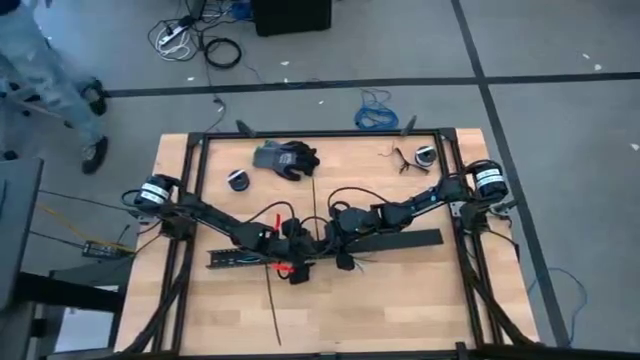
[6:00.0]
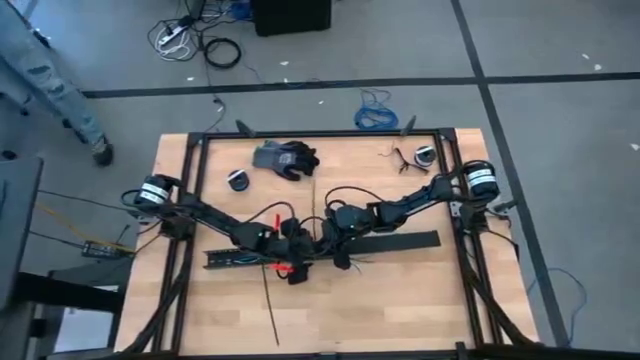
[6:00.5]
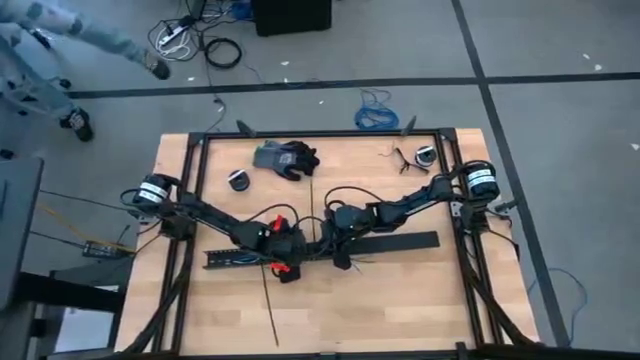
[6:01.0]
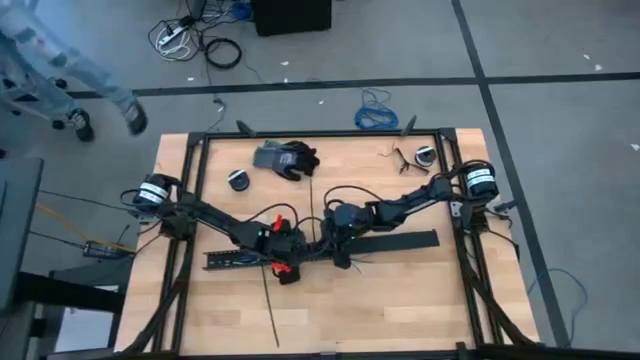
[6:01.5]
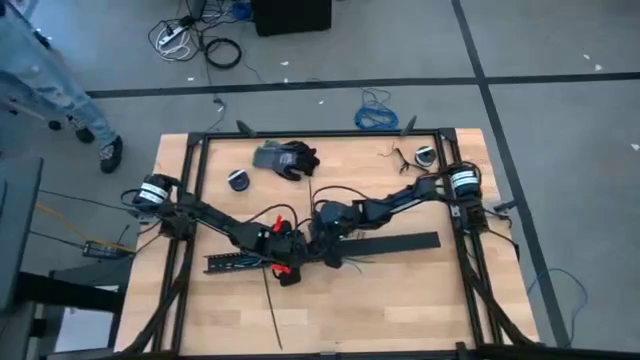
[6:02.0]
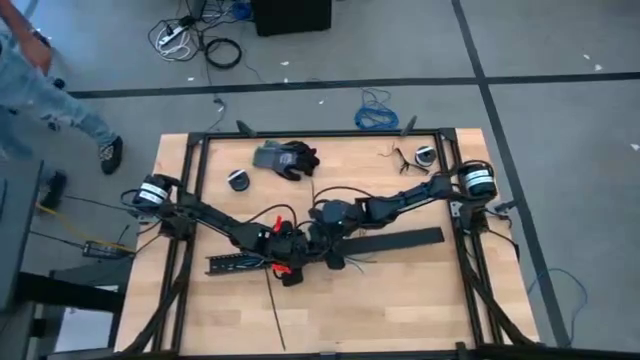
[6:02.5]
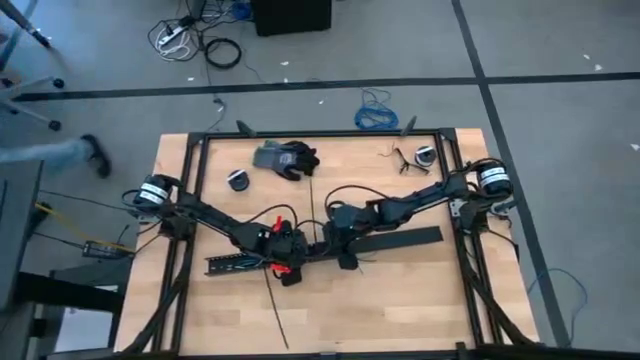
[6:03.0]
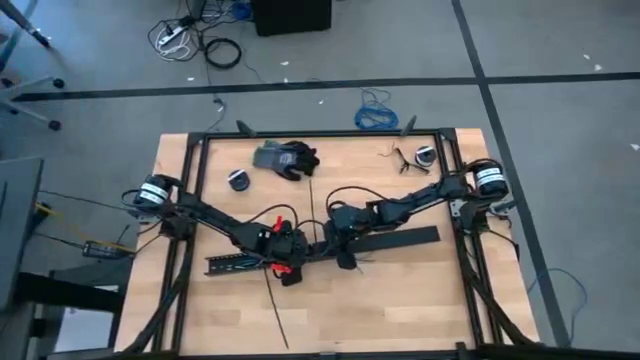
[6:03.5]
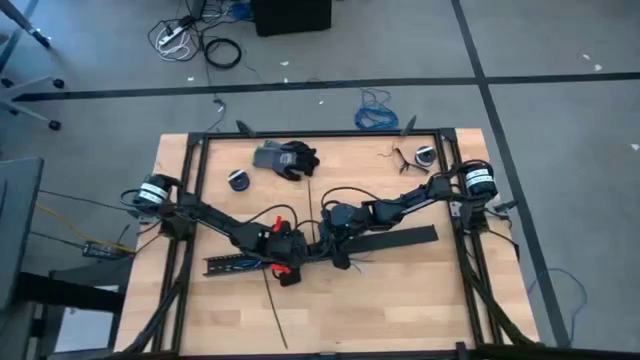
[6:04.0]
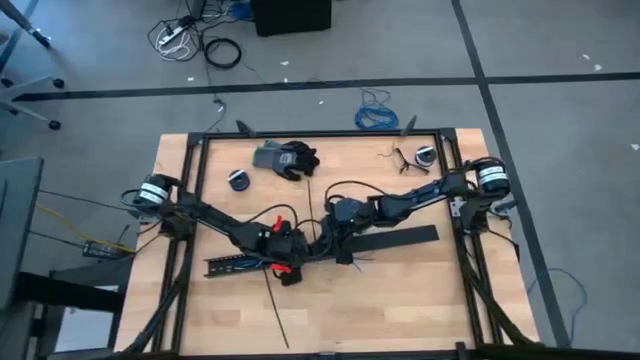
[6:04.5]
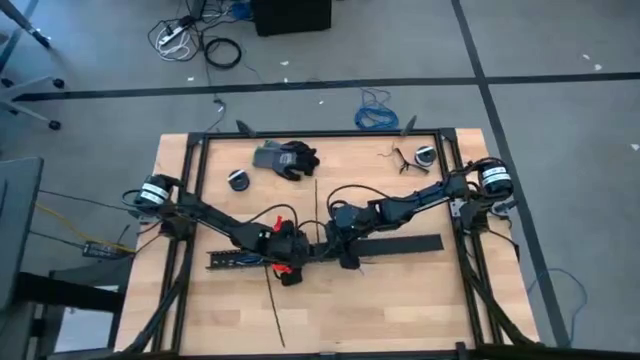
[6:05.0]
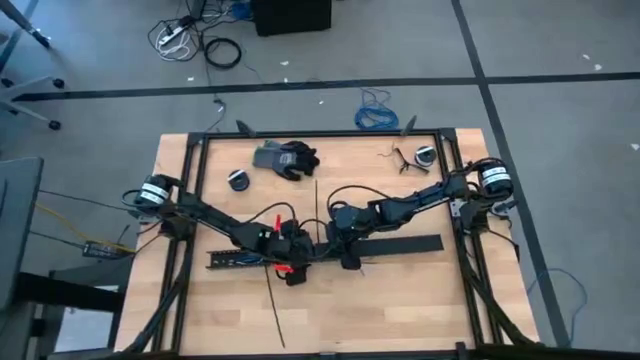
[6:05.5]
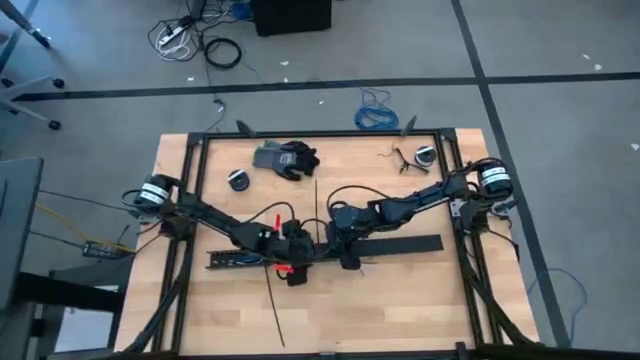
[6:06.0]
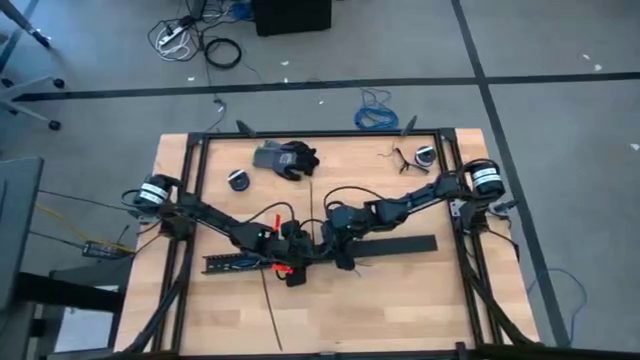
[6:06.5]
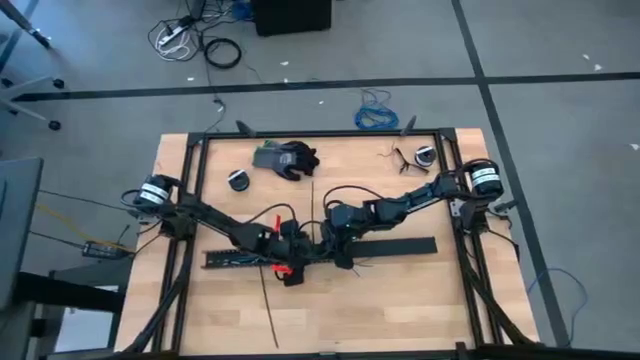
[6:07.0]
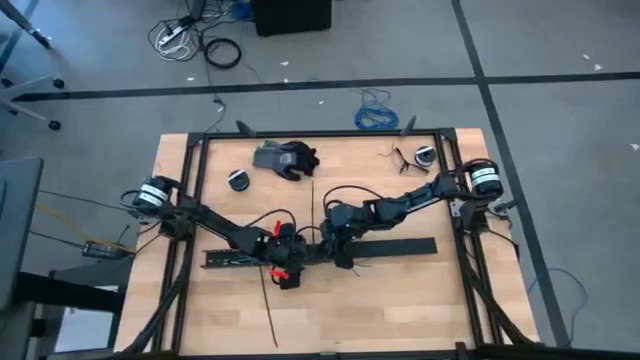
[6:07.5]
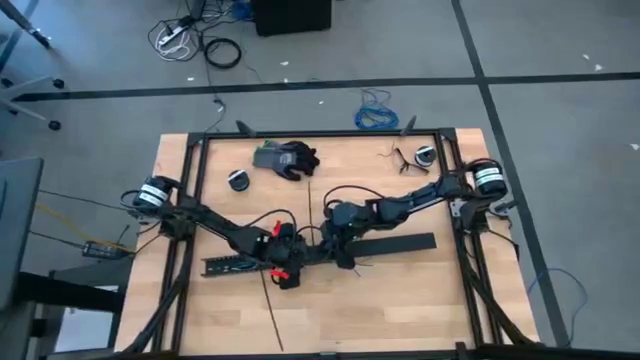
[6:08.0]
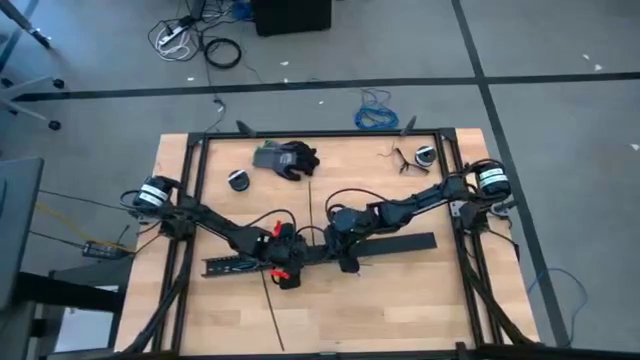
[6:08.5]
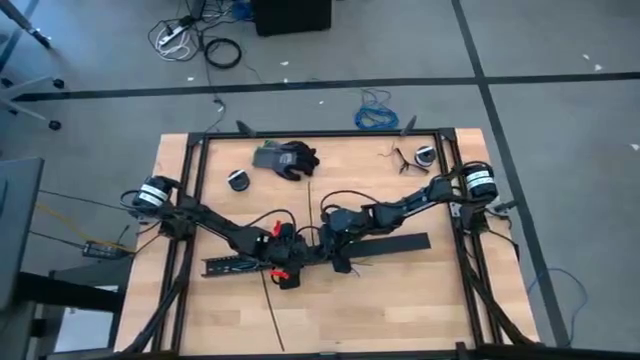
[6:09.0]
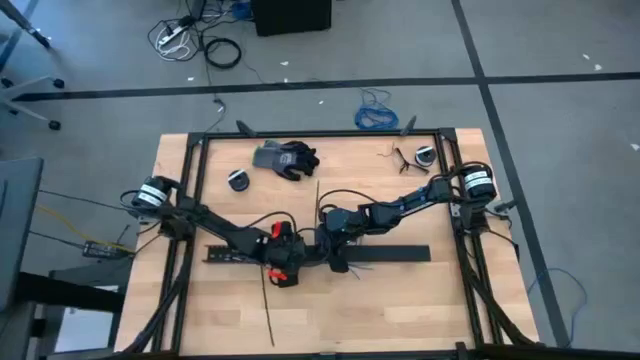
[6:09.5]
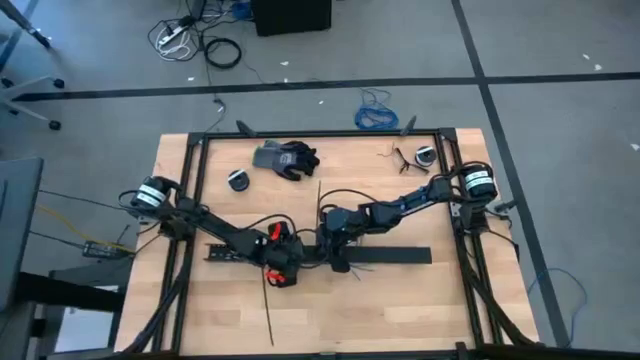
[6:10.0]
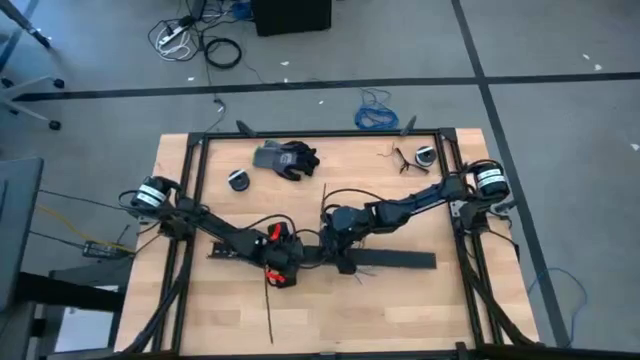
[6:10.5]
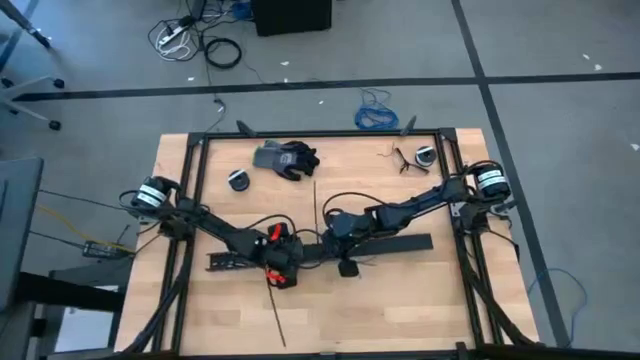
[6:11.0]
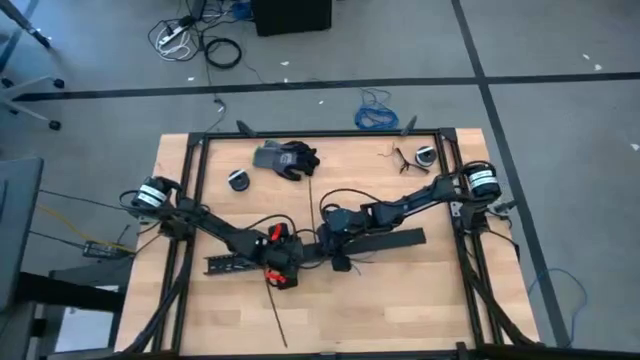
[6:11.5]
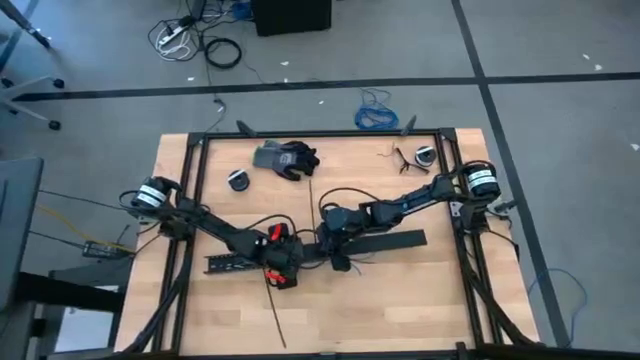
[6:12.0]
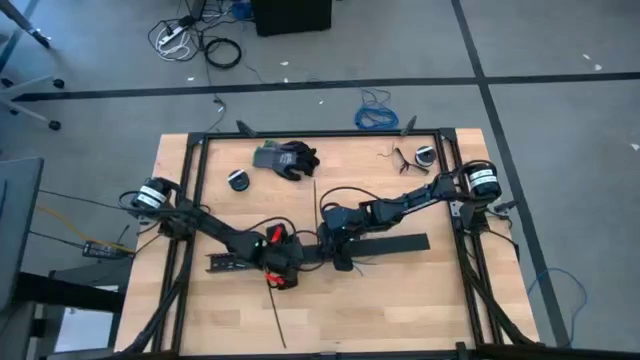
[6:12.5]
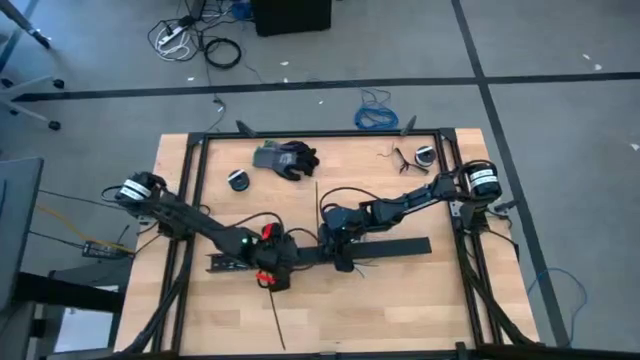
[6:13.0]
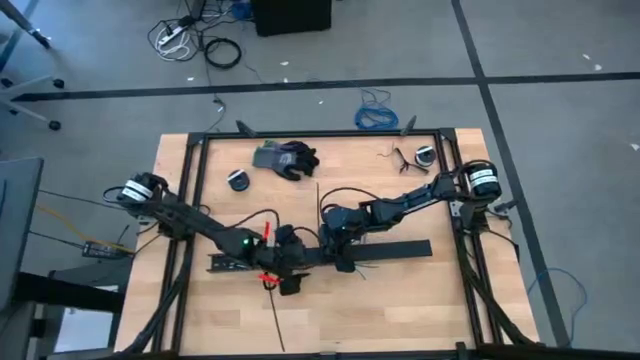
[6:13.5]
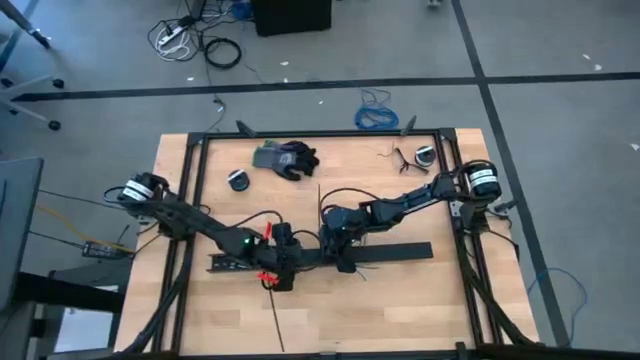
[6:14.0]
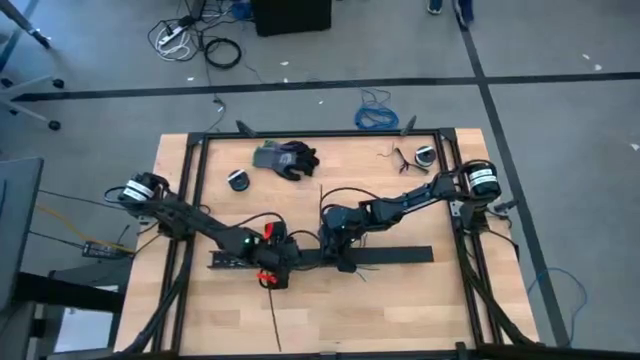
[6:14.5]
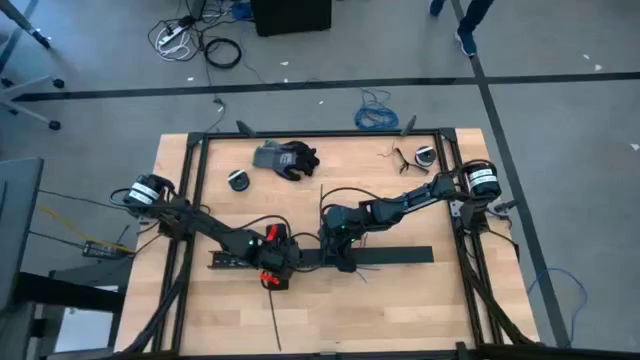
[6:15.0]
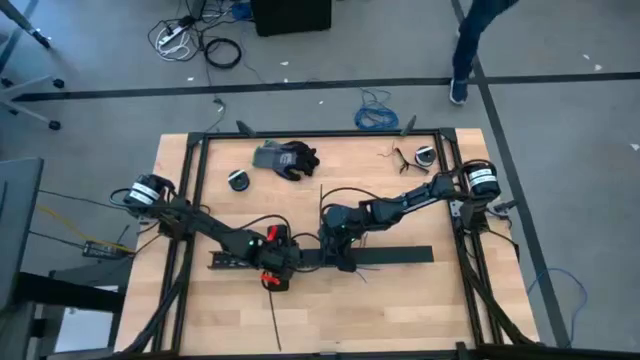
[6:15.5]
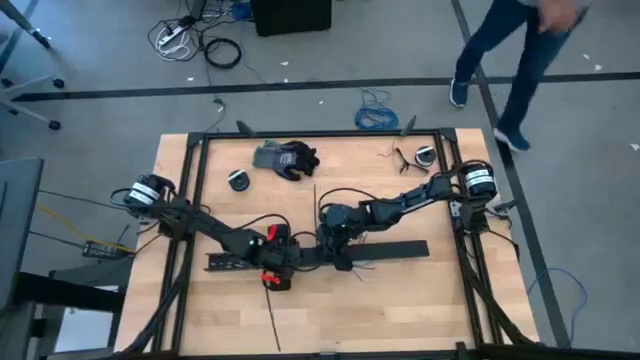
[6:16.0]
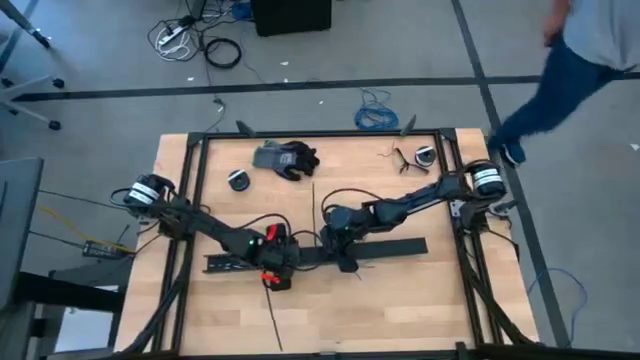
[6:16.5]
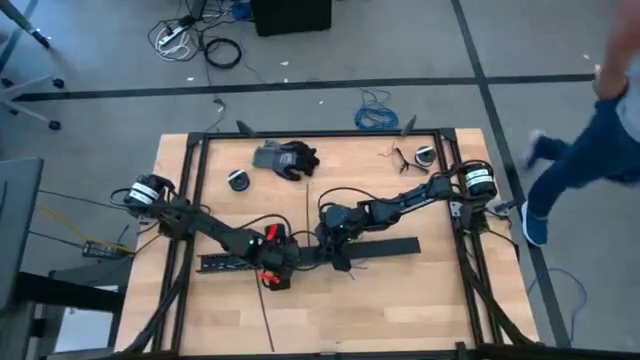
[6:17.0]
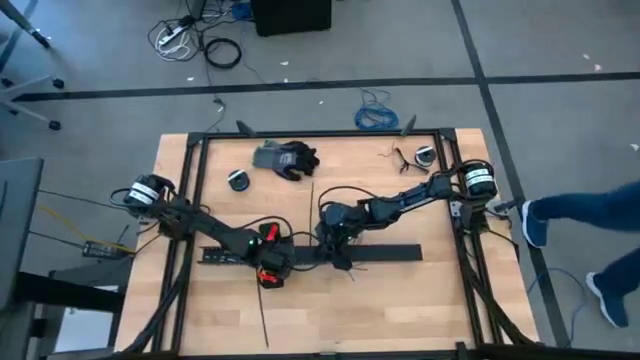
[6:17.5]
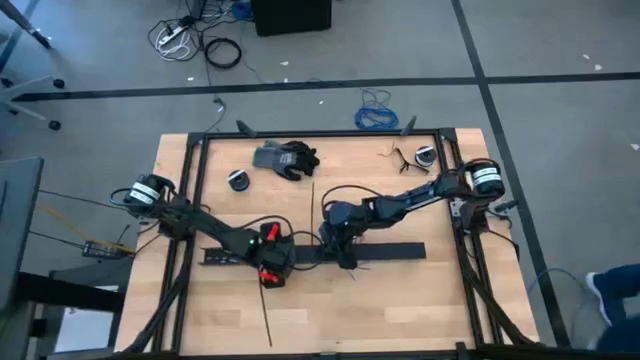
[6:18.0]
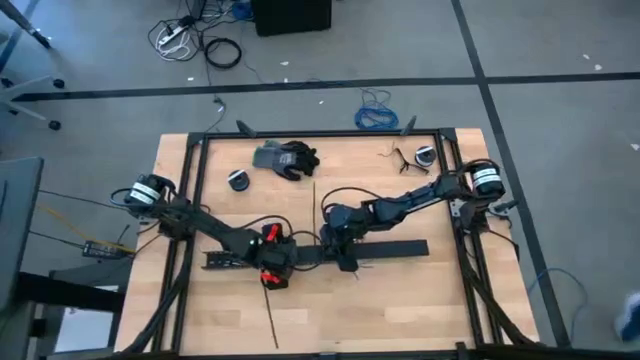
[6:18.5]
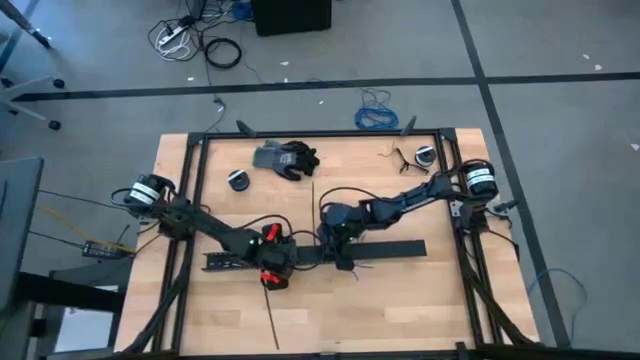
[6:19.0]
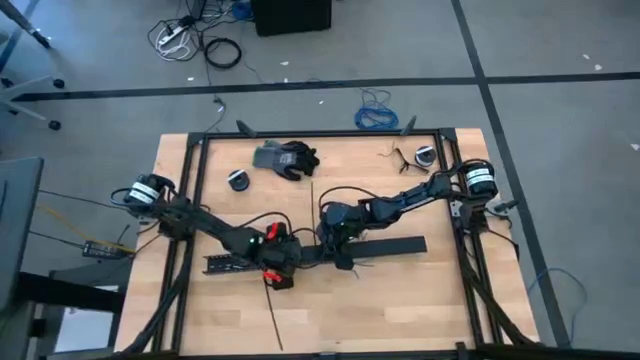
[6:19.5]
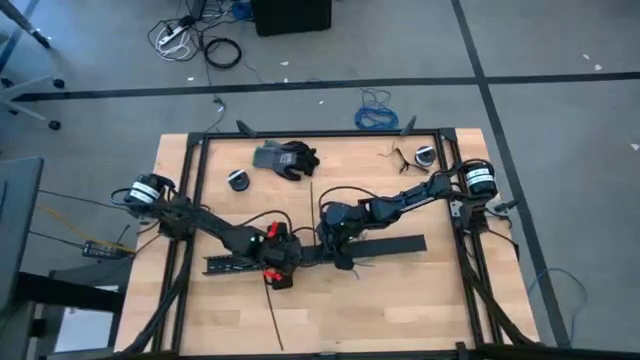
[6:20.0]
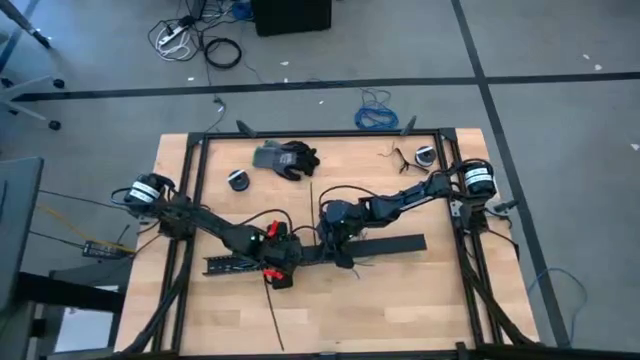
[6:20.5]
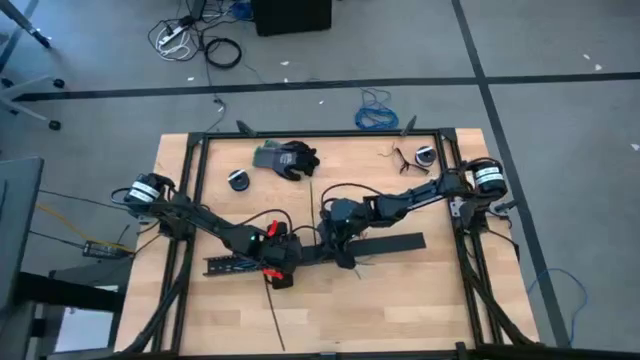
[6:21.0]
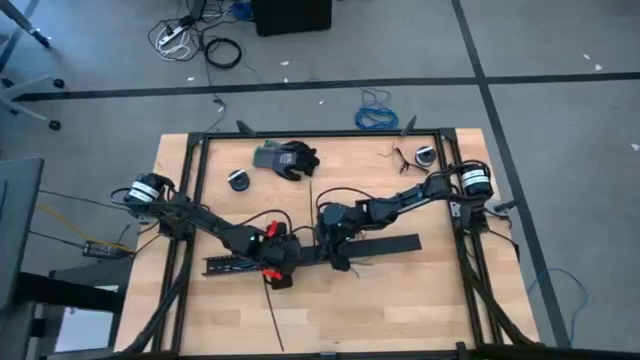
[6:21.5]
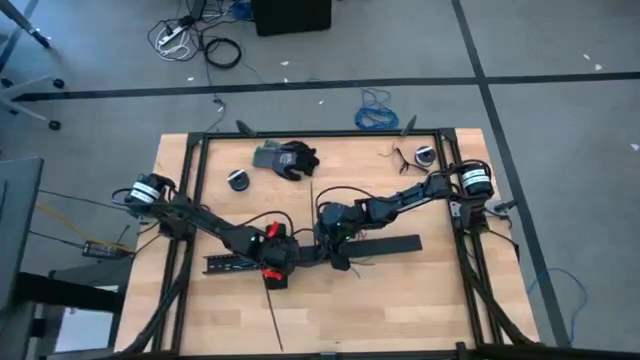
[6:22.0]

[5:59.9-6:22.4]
Task: Ziptie cables
Close the black cable duct
